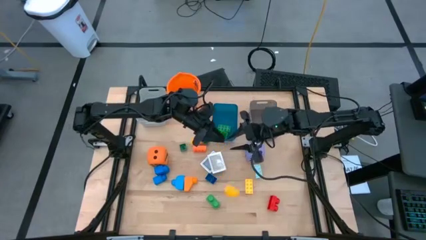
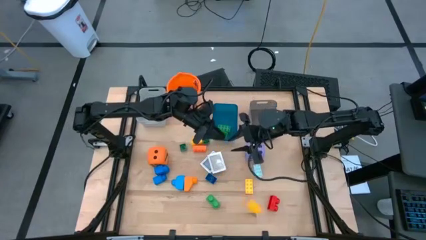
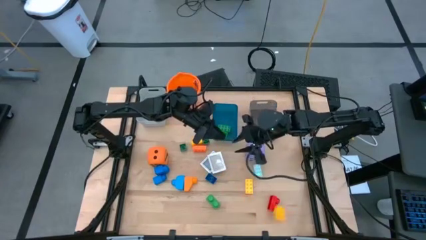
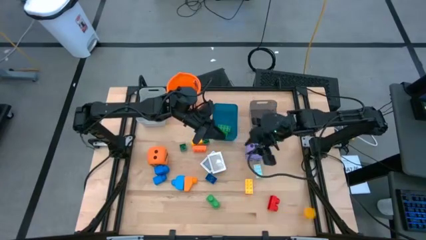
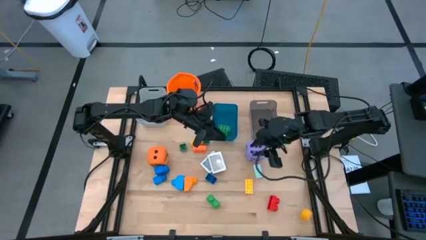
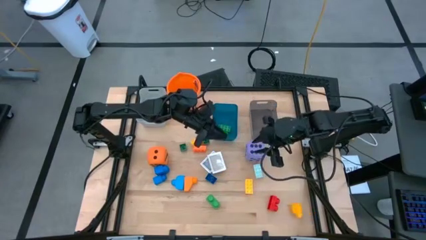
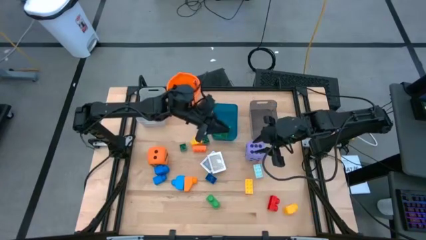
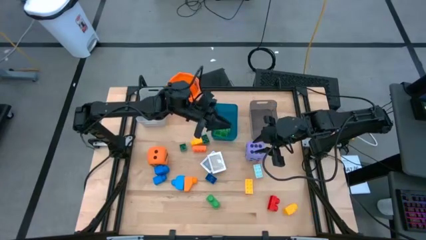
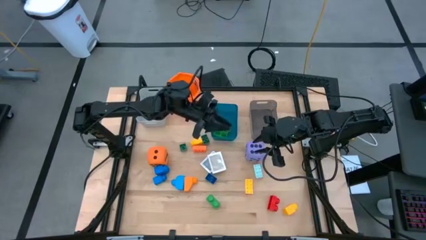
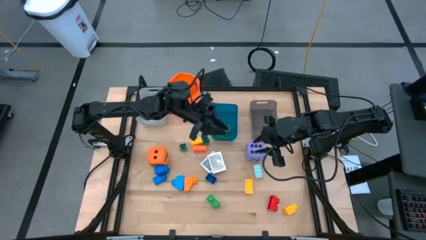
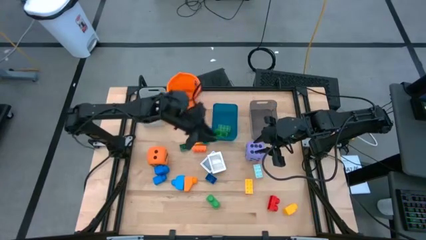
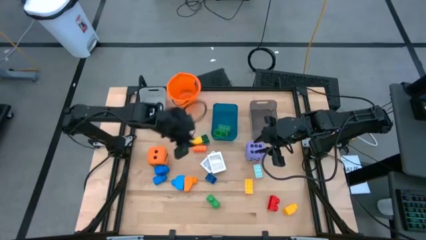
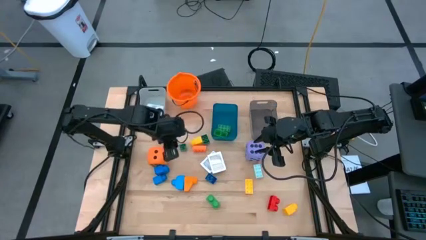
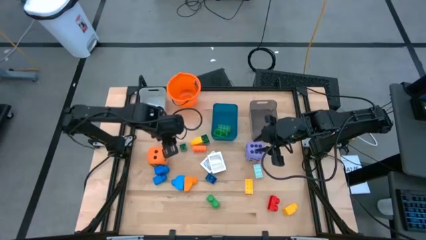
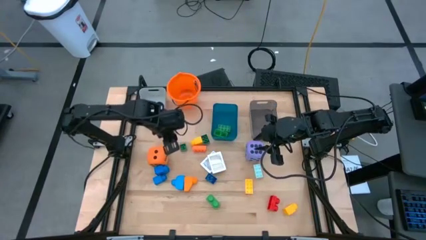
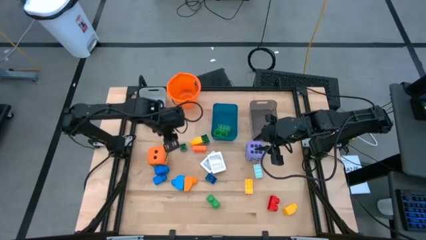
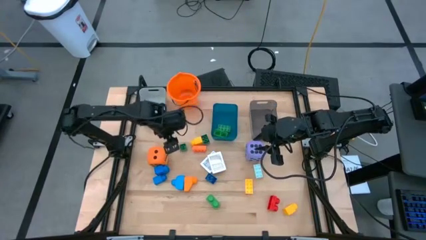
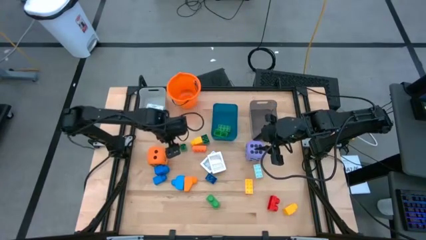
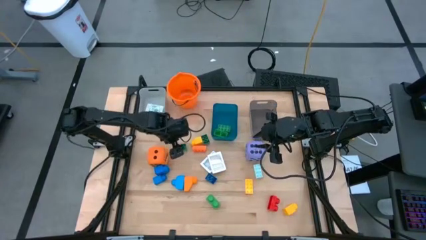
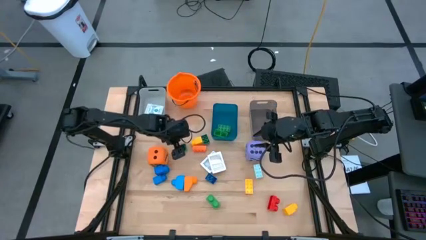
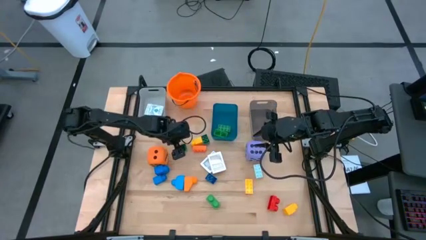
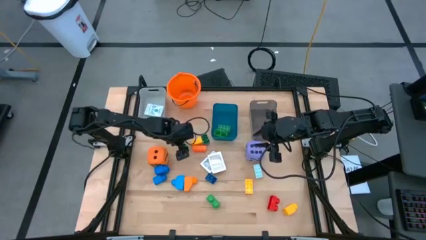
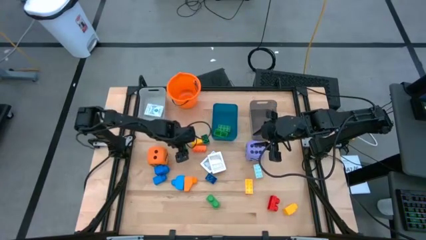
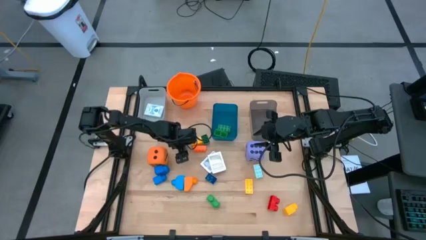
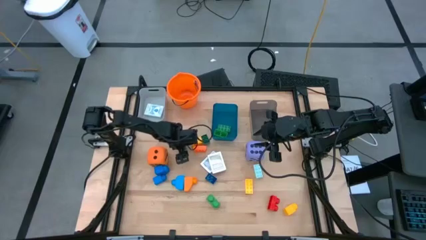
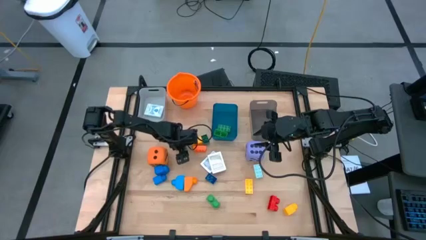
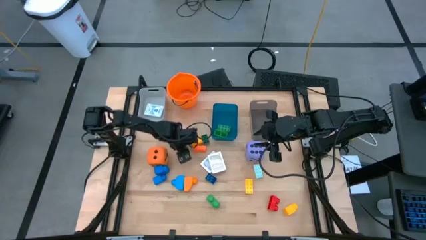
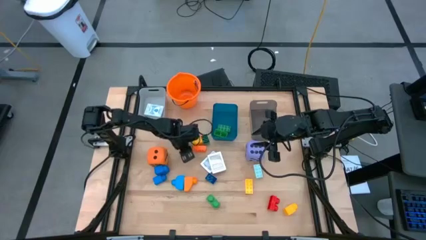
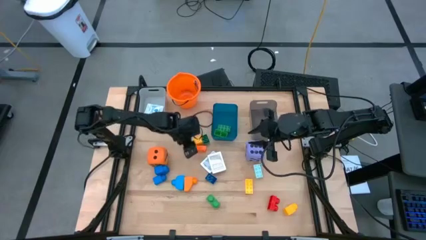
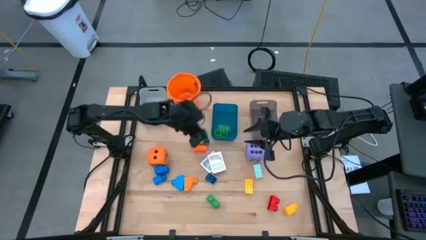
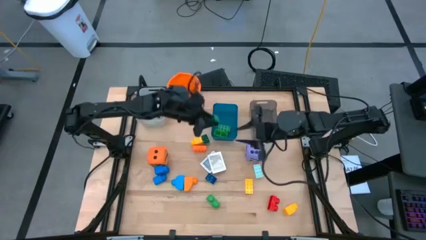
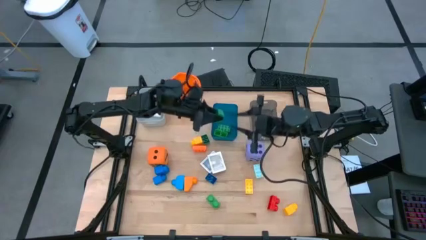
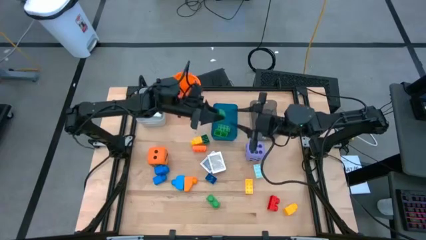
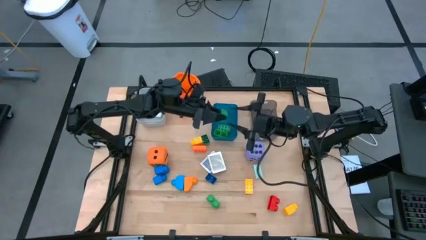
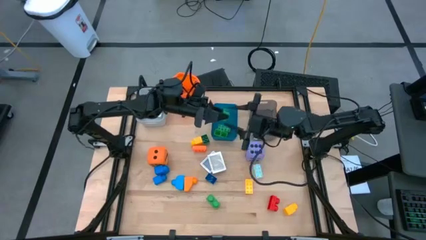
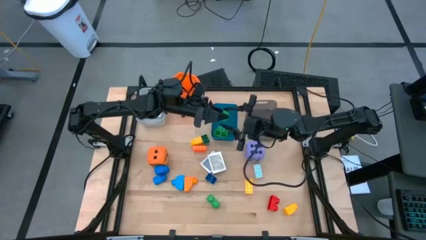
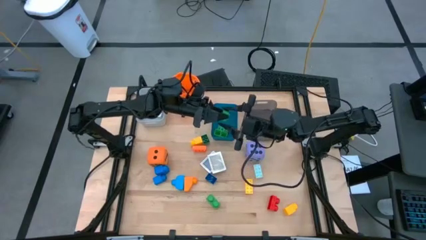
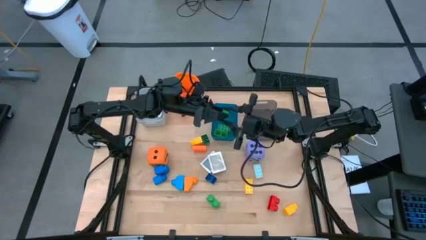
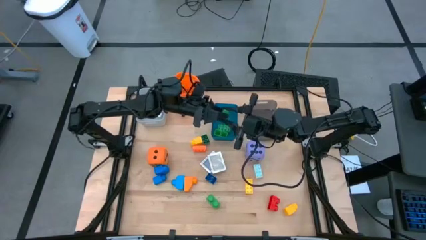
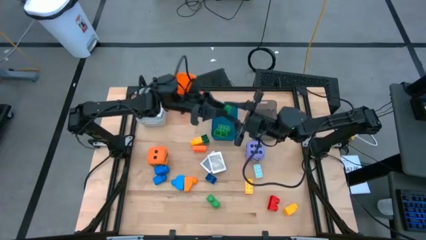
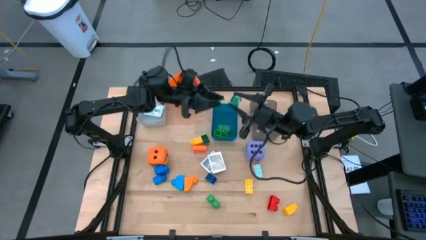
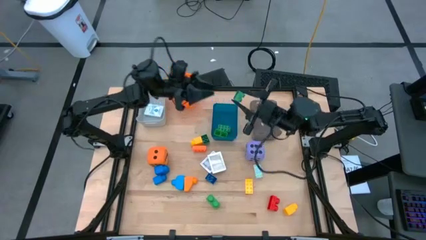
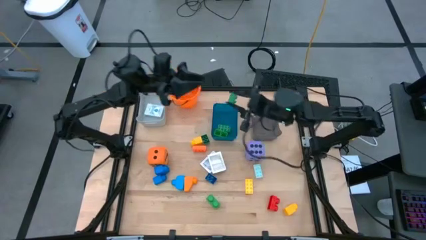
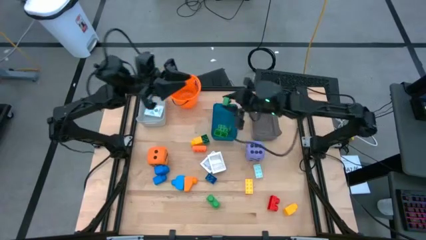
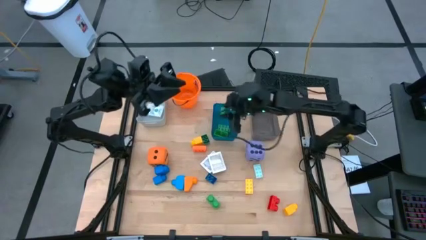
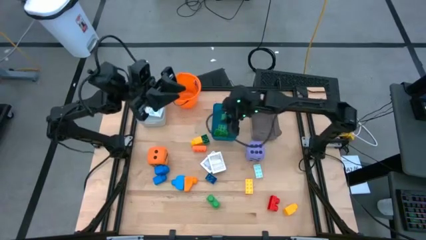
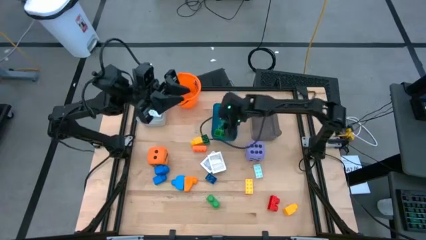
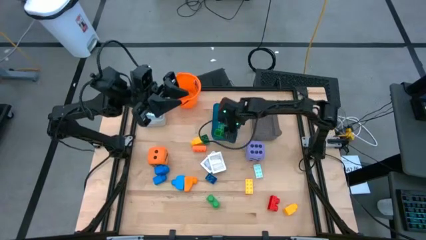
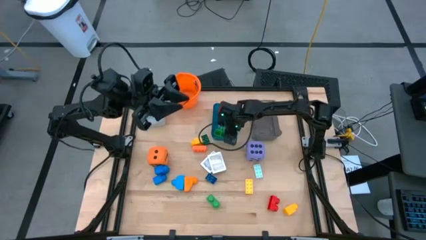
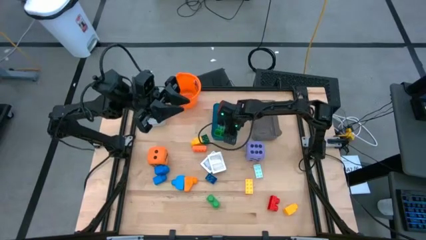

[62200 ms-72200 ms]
Task: Pick & Place Toys
Put the green game piece into the blue bin
